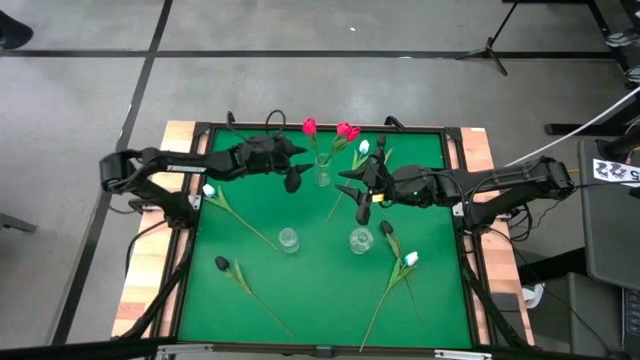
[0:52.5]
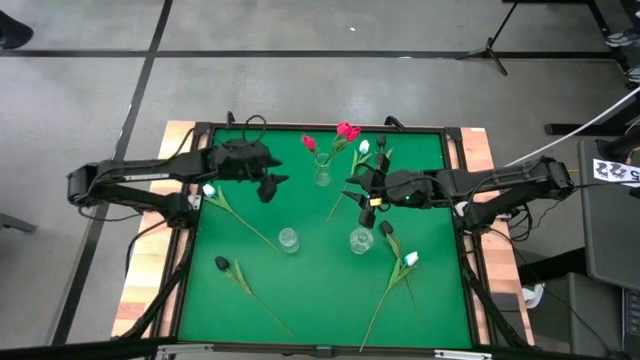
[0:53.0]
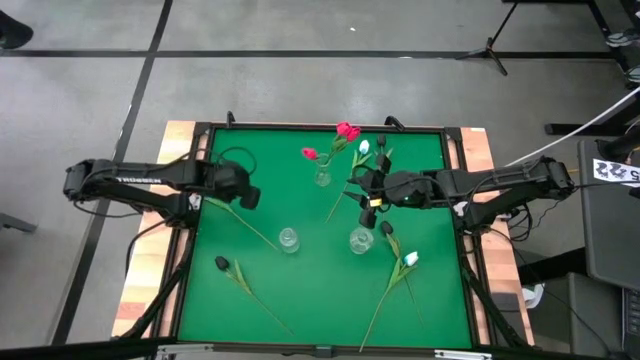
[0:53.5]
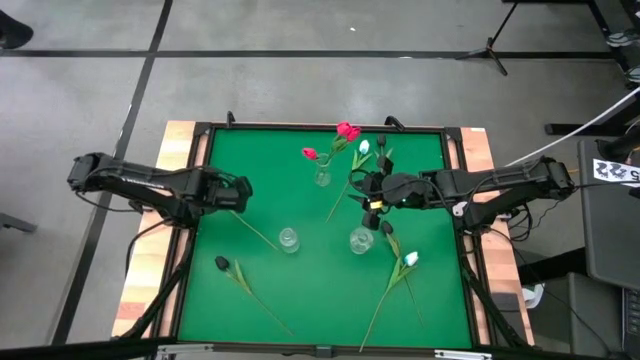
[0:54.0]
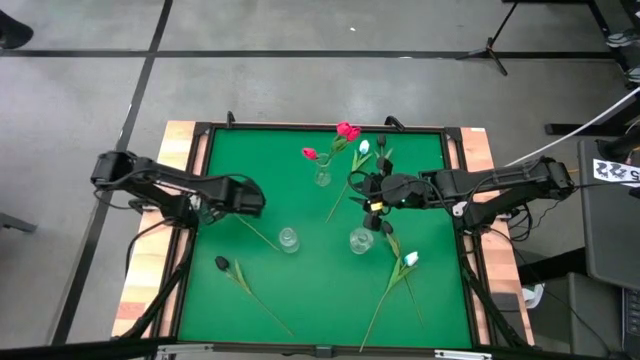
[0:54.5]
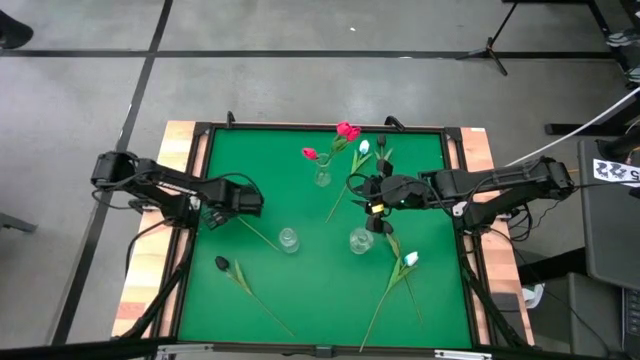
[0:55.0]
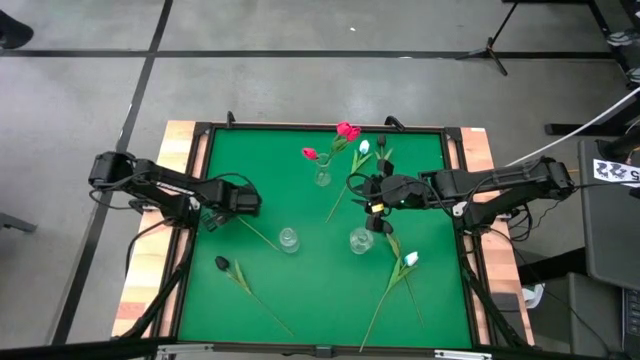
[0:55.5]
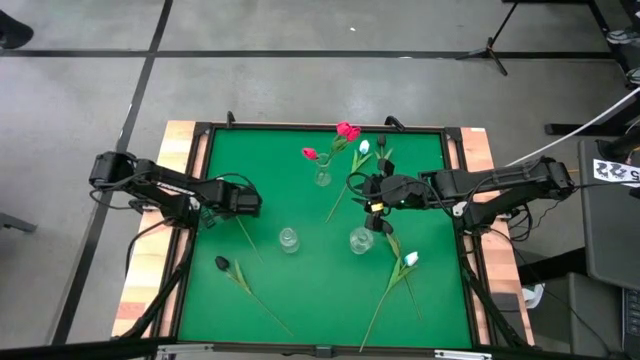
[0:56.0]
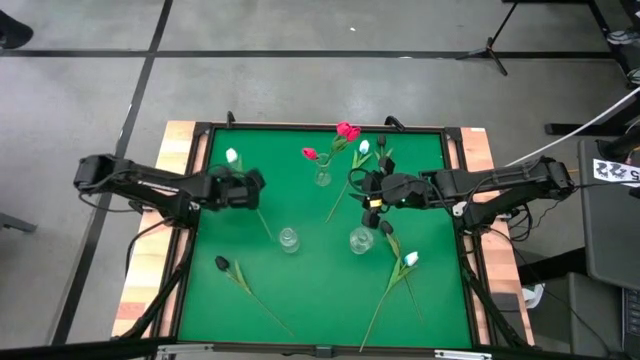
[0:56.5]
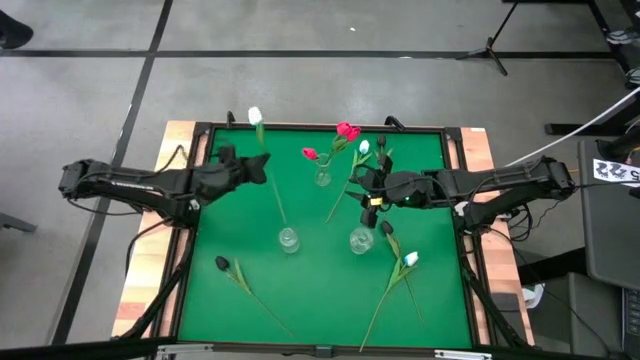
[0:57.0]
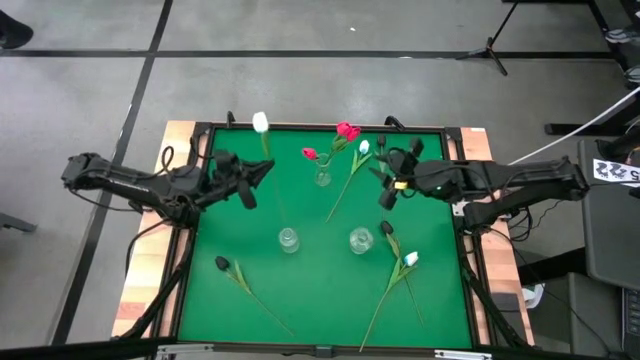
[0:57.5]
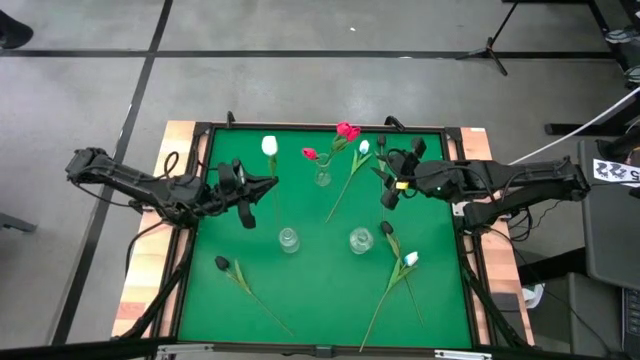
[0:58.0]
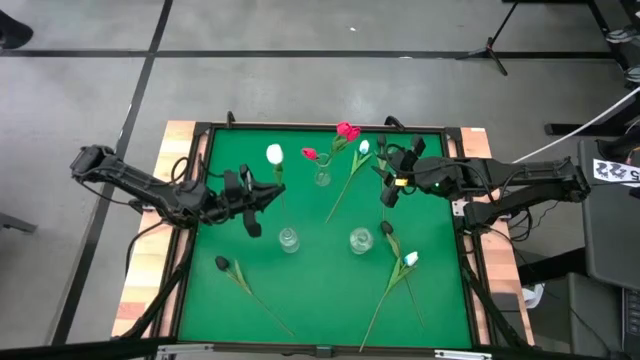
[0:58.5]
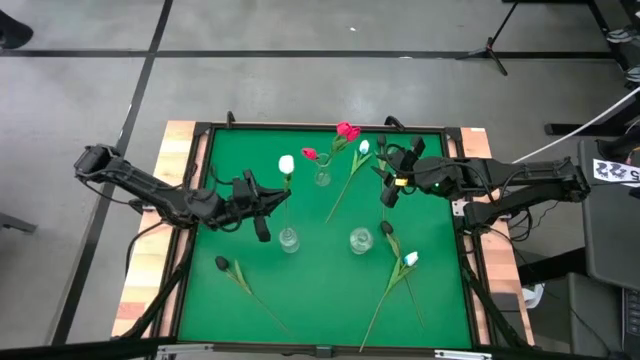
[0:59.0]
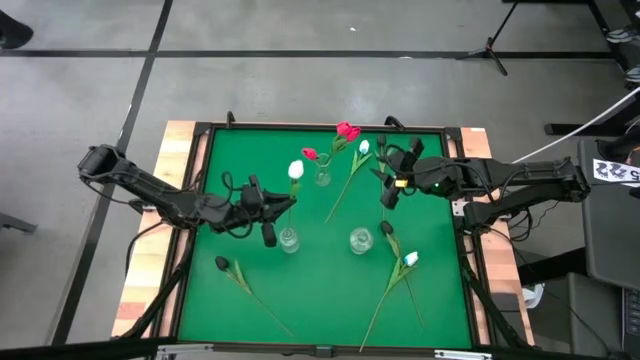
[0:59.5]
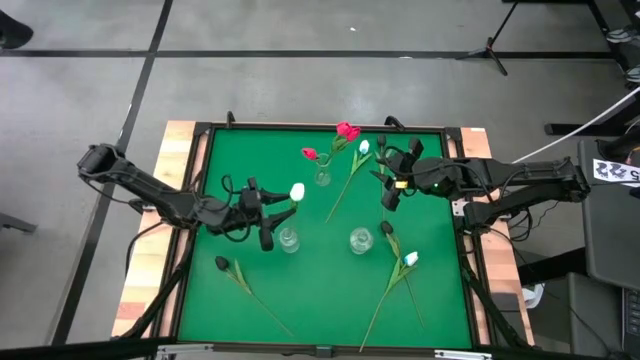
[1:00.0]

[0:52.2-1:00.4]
Task: Sort flowers into vase by color
Put the left white tulip into the bottom left transparent vase

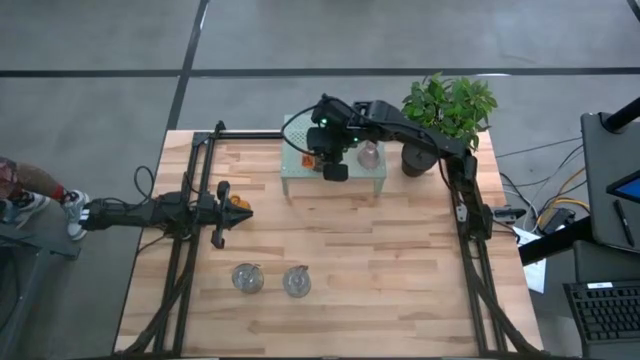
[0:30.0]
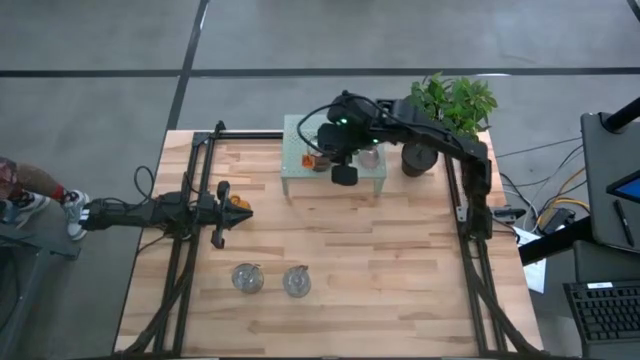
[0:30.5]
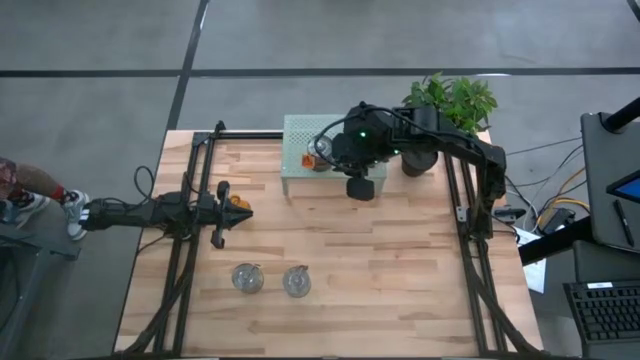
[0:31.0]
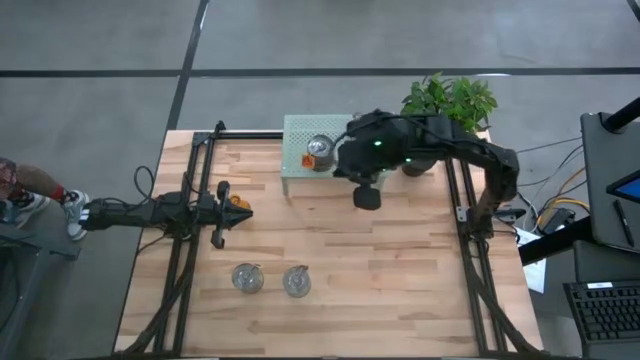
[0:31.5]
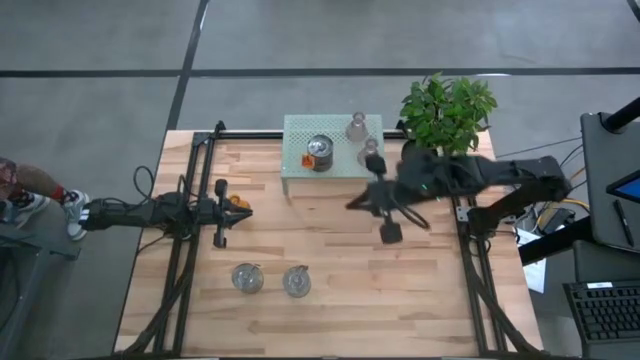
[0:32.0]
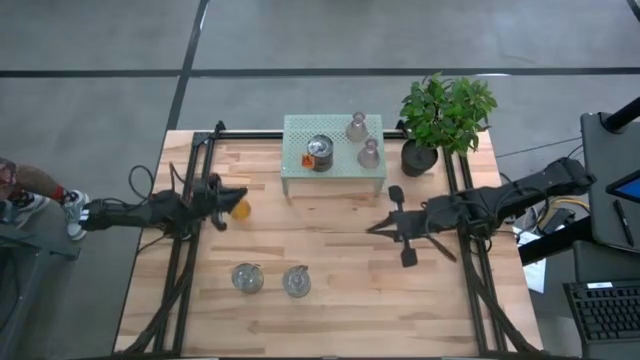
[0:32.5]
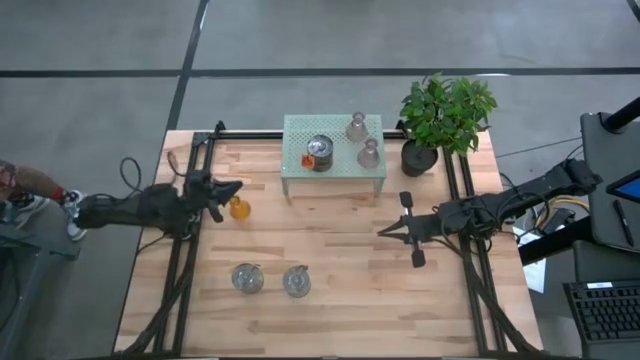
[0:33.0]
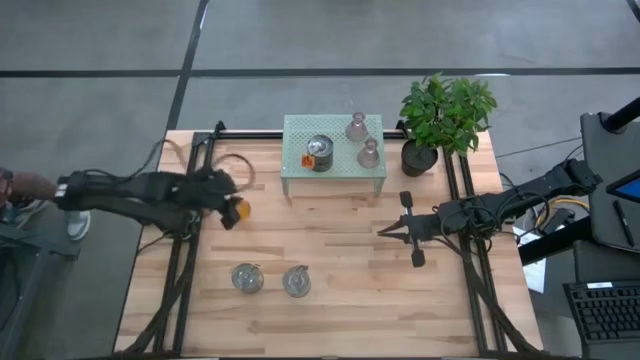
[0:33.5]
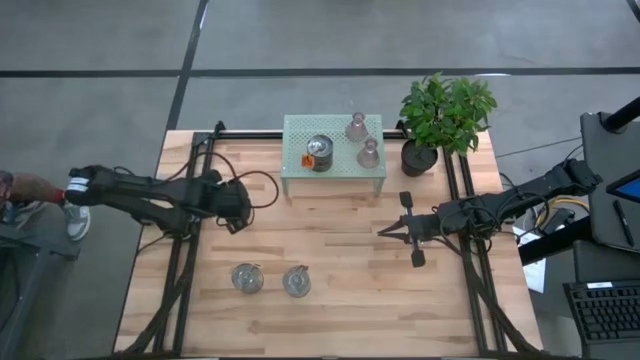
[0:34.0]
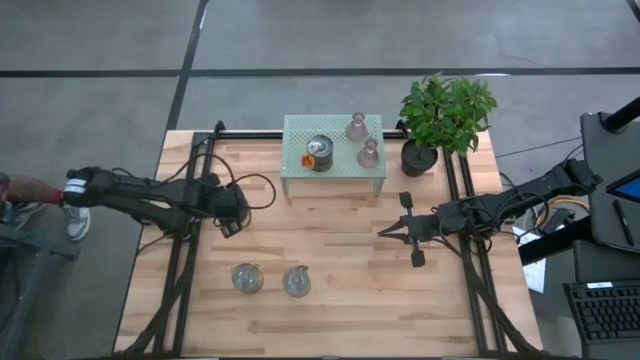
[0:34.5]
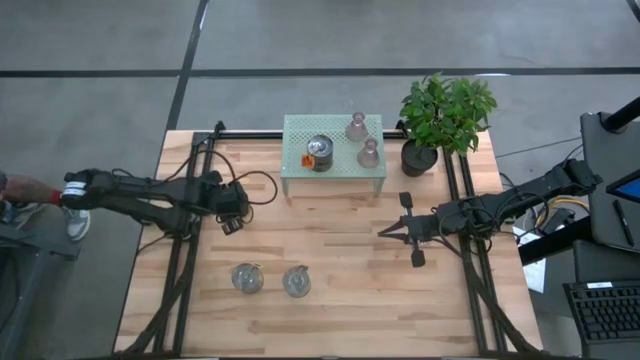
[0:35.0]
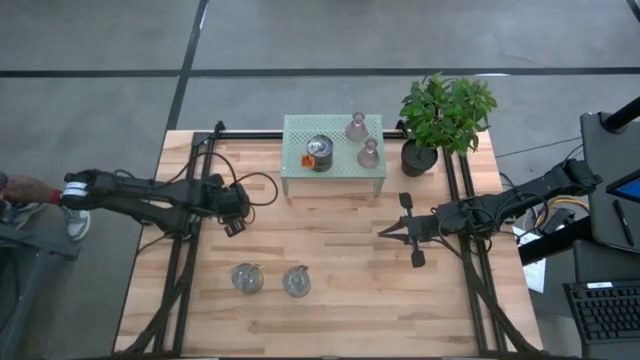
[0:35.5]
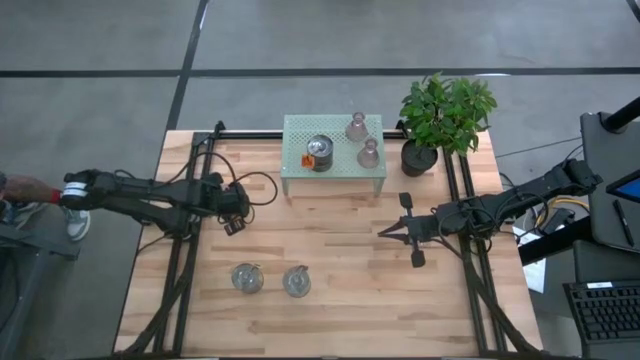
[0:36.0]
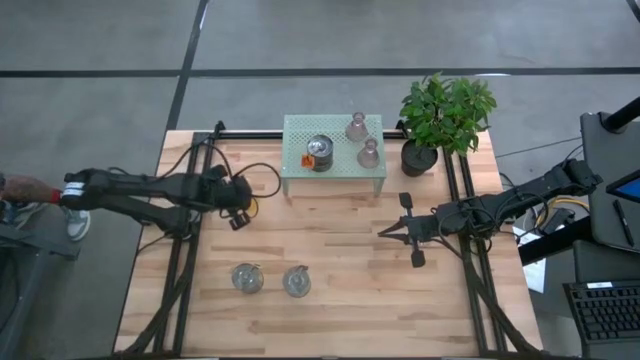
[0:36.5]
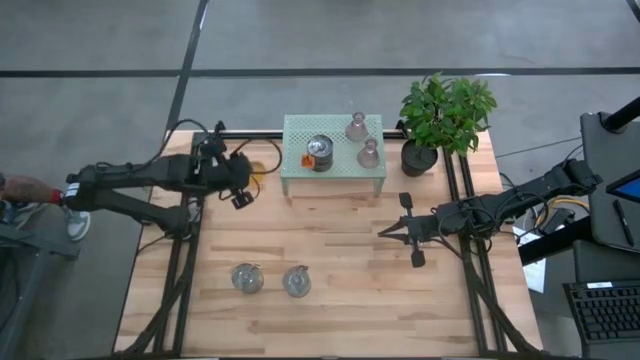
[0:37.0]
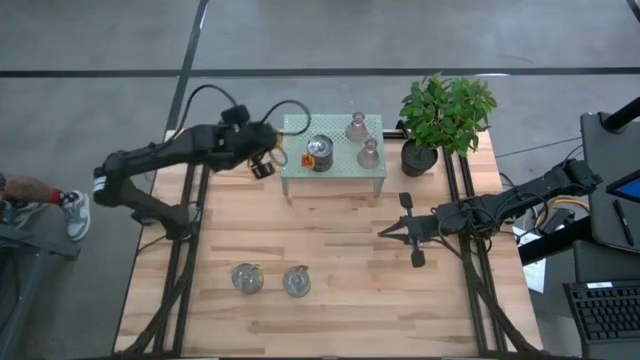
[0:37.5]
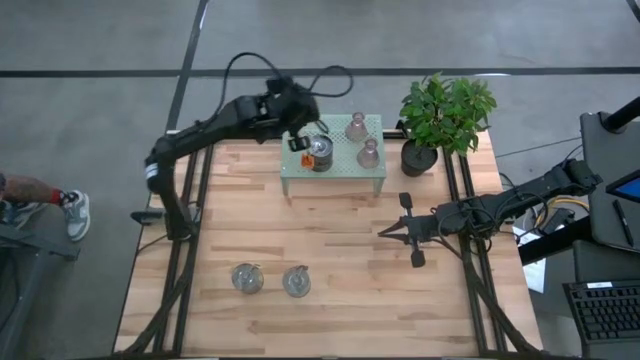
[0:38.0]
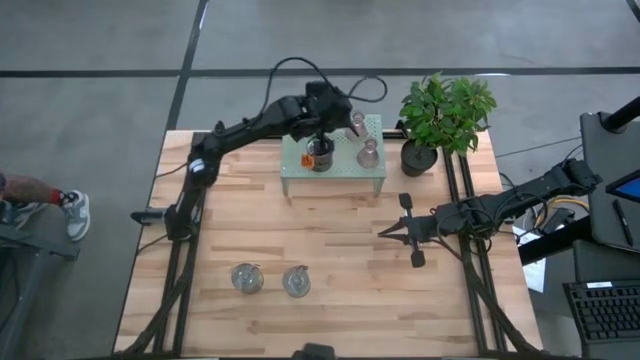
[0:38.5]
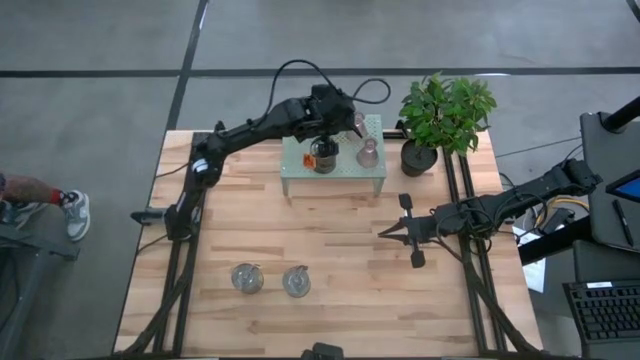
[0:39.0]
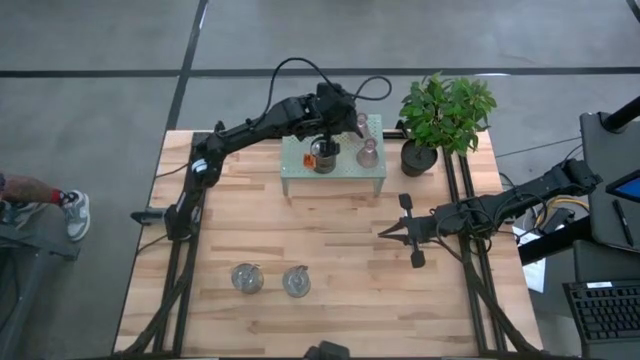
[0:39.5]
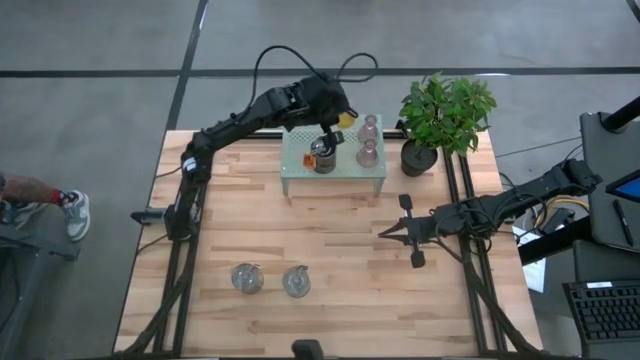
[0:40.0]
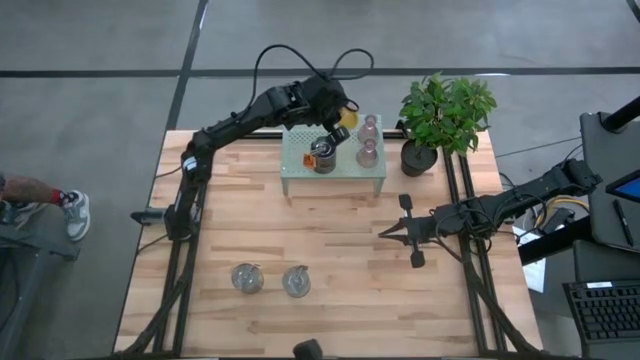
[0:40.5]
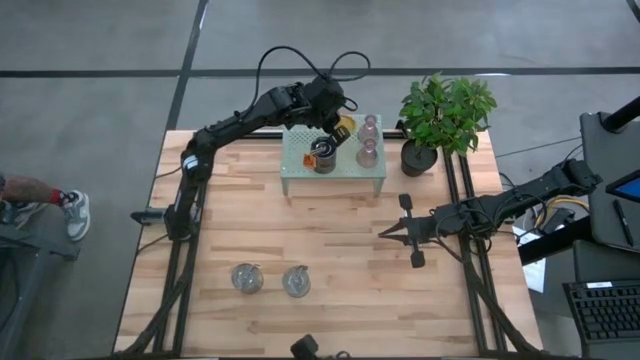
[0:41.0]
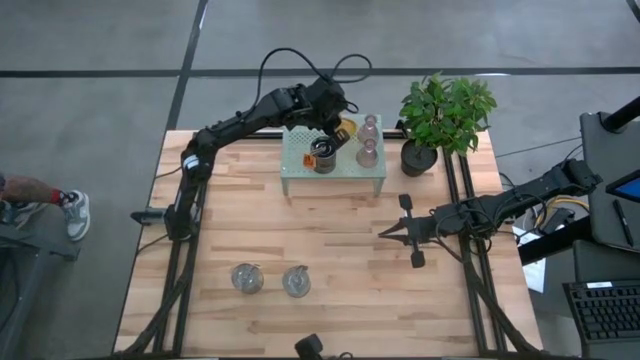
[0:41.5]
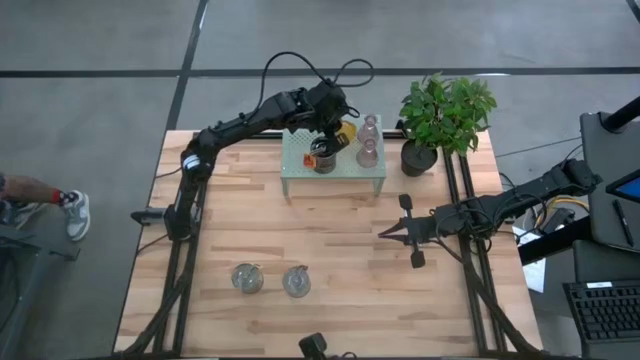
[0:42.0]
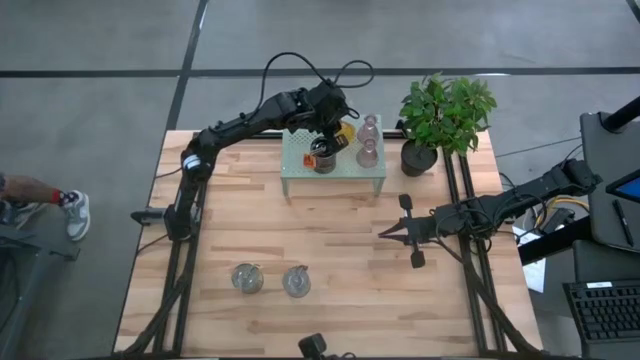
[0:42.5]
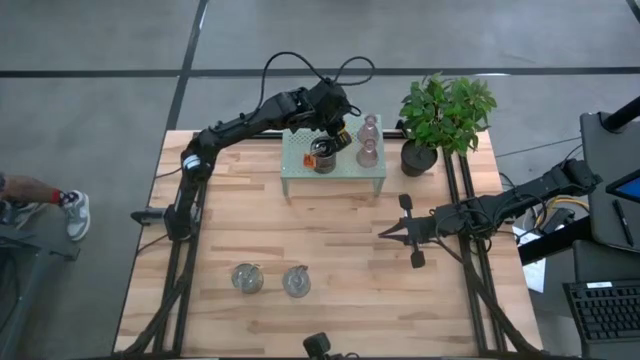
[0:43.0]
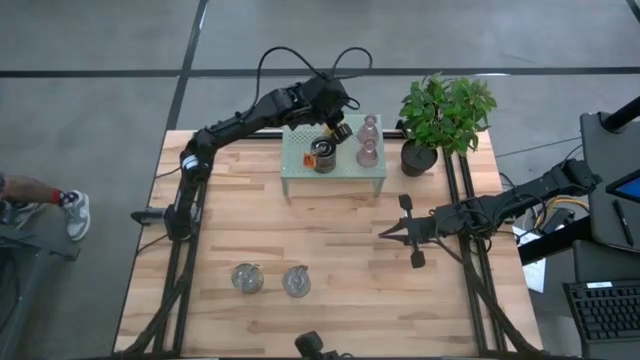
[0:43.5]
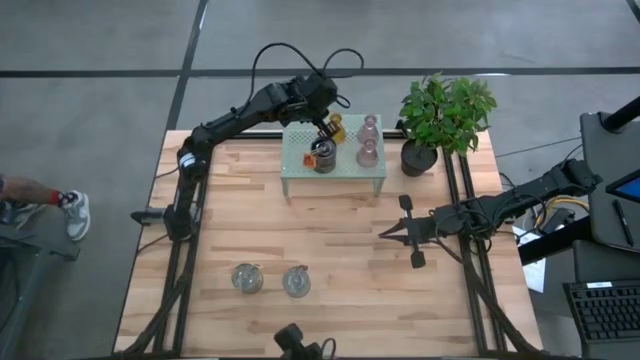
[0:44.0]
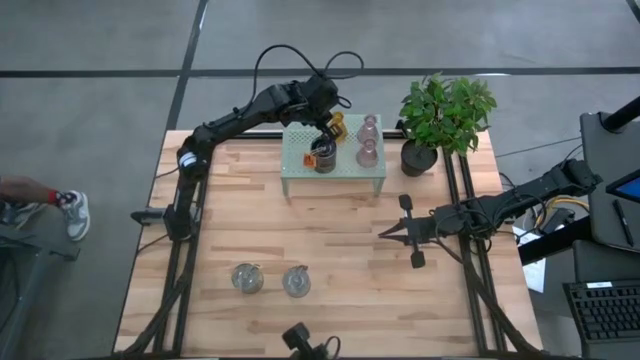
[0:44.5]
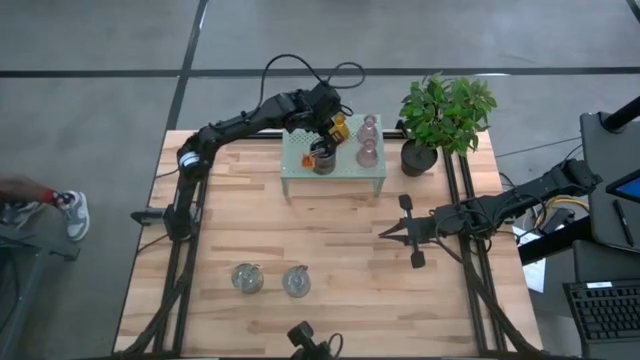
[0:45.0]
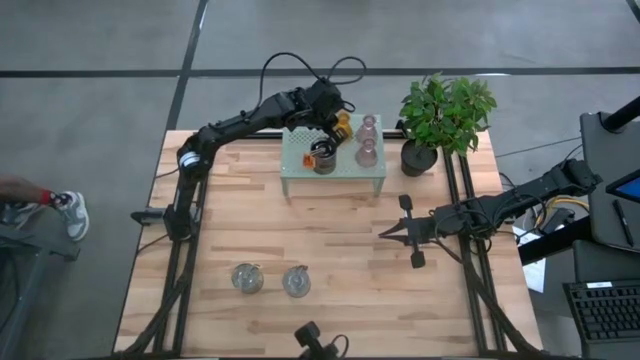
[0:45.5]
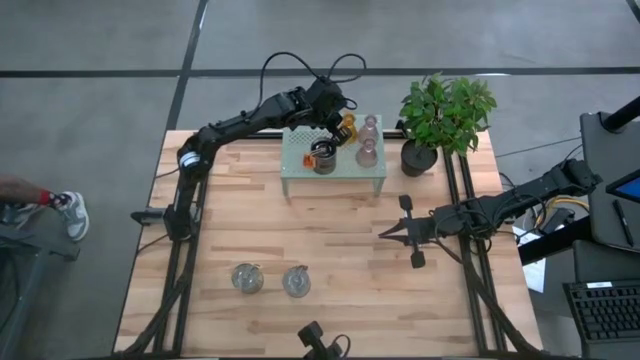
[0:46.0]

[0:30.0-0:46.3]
Task: Pick & Place candle stick holders
Put the orange glass candle holder on the shelf
